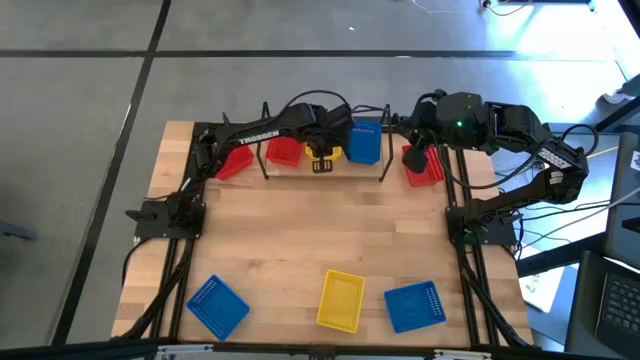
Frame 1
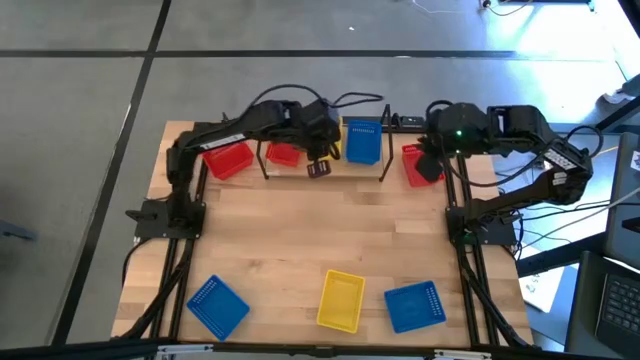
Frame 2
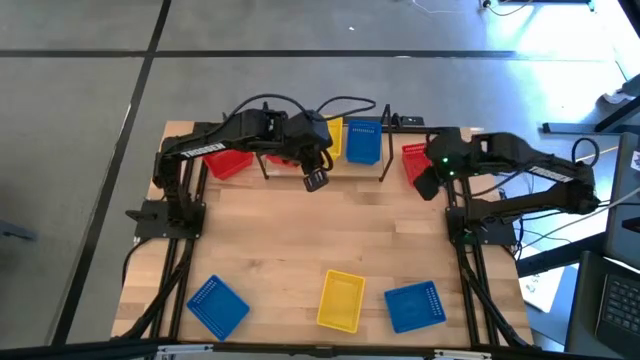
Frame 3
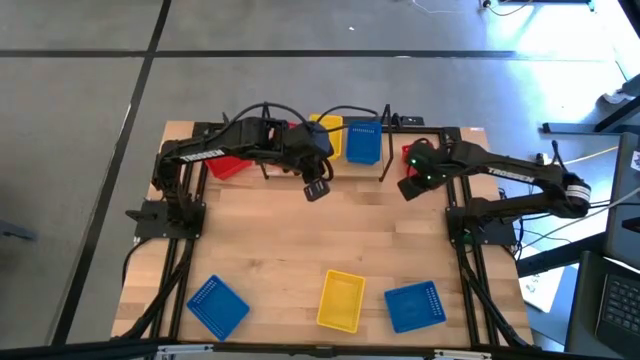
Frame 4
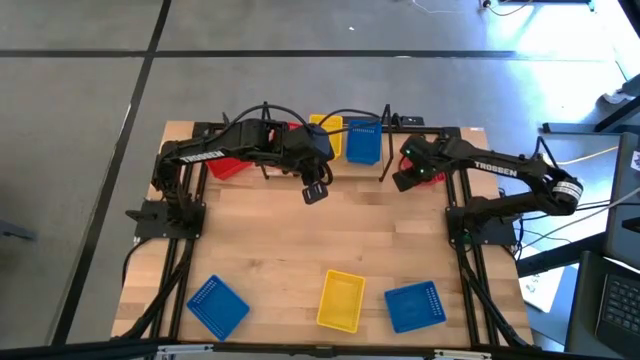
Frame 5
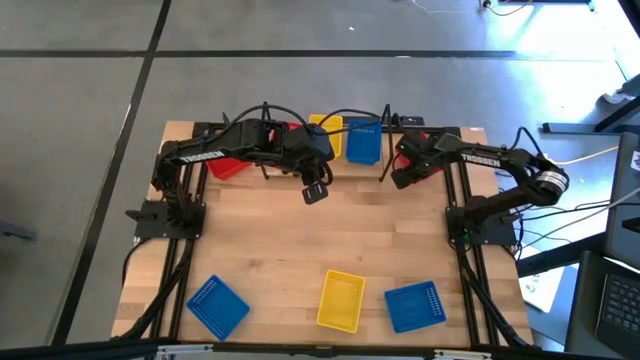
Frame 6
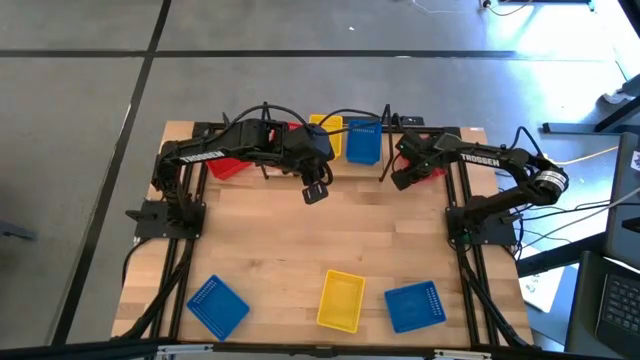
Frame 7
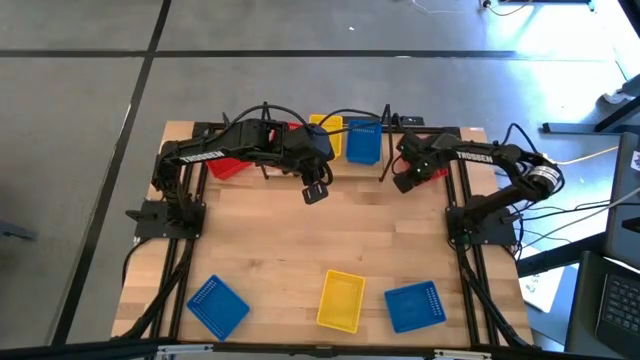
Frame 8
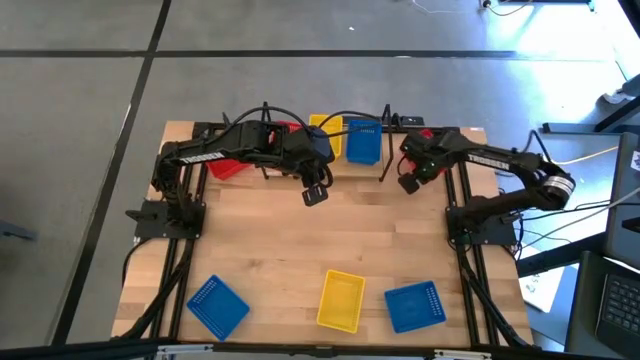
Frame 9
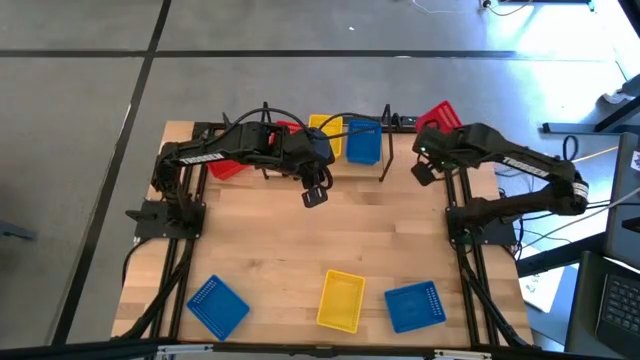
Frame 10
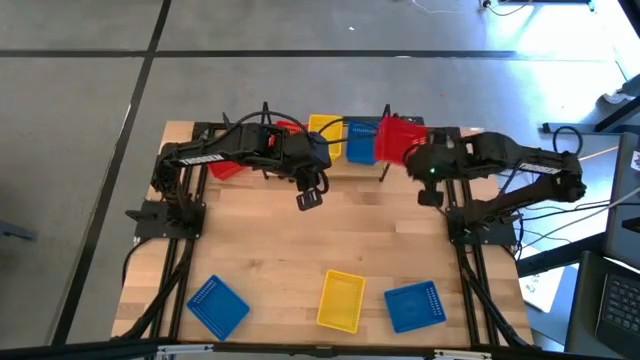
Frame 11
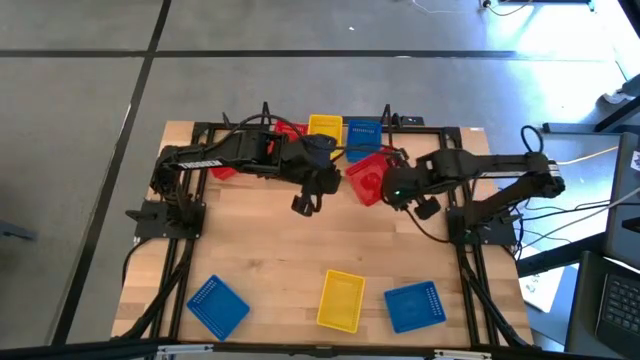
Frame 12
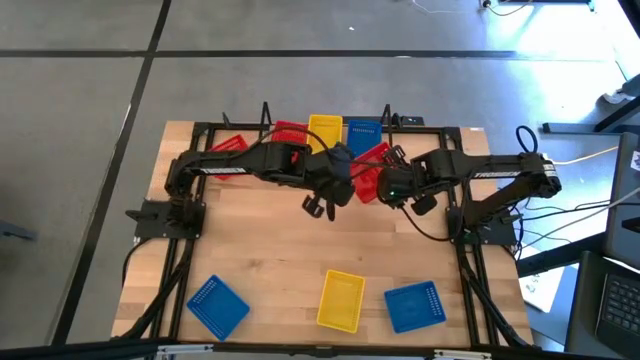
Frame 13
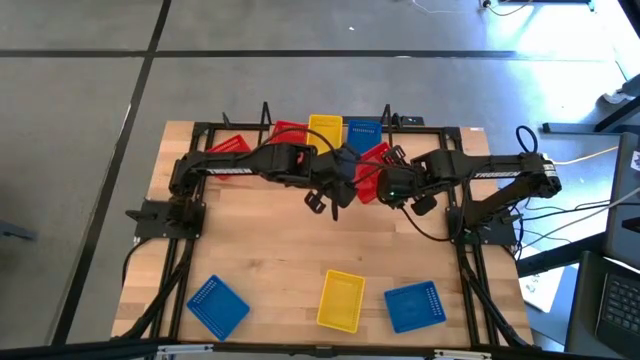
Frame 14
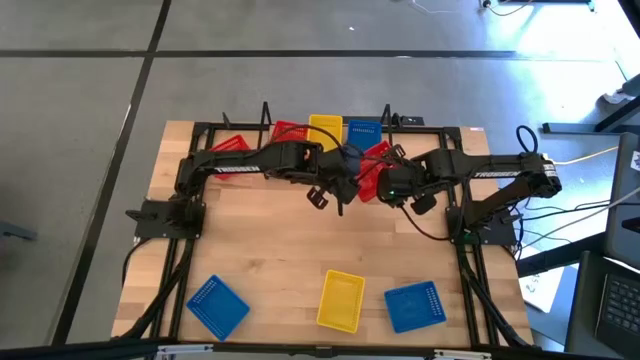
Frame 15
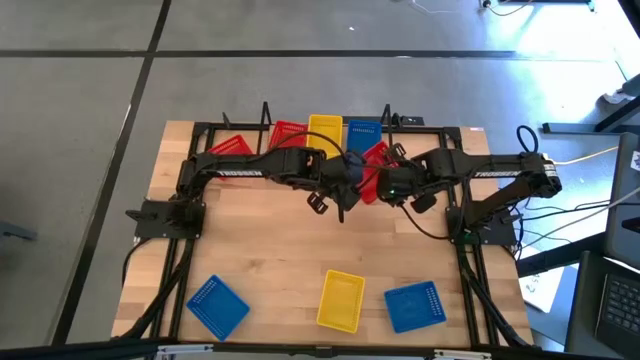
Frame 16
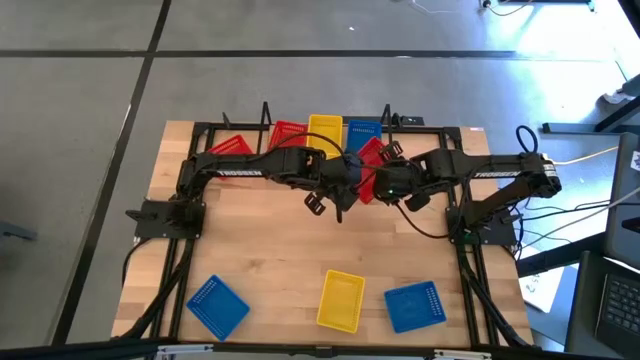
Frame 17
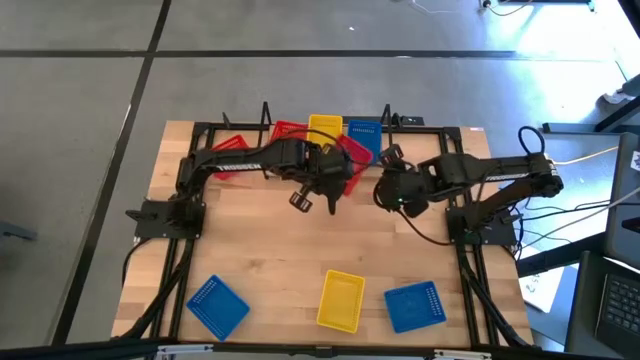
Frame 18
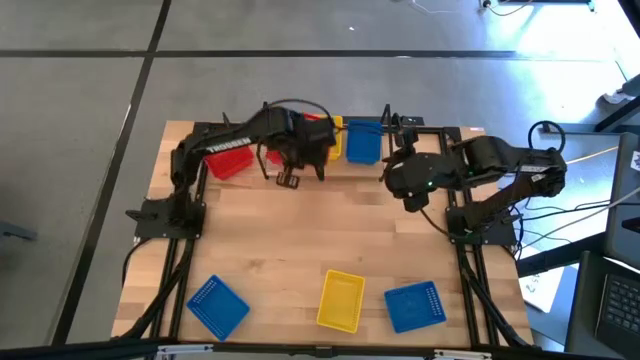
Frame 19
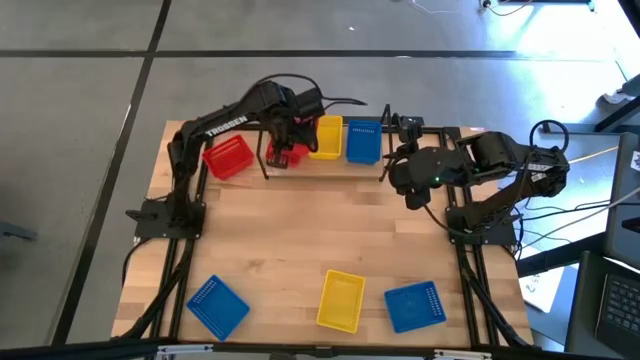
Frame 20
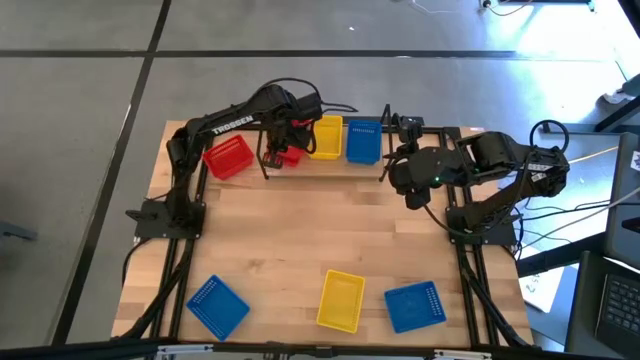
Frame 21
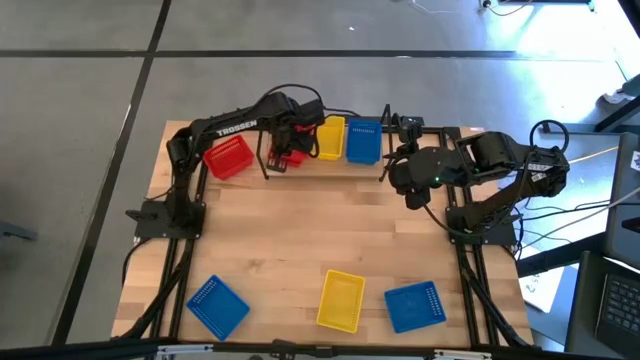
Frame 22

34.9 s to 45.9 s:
Task: Stack baskets on shelf by color
Stack the right red bin on the red bin on the shelf

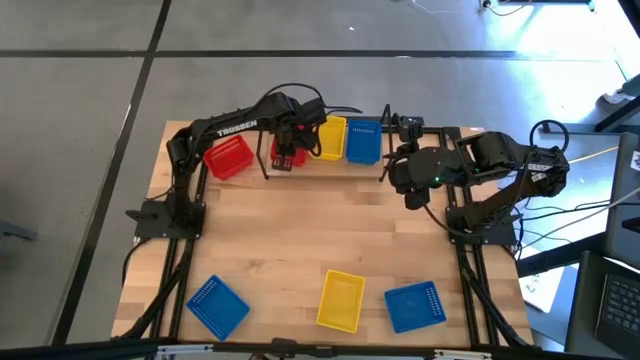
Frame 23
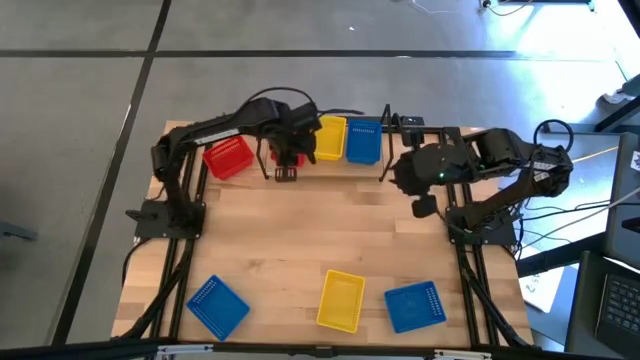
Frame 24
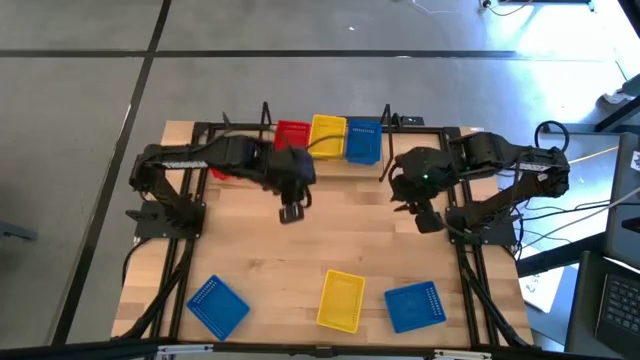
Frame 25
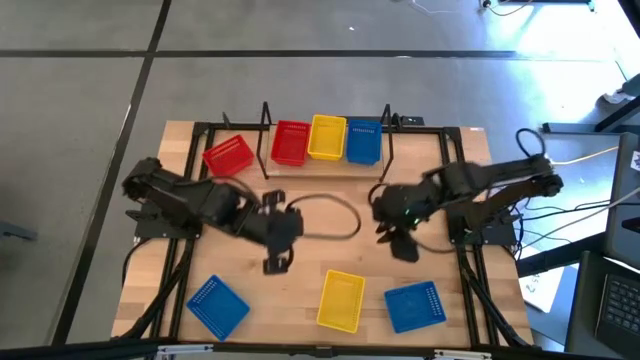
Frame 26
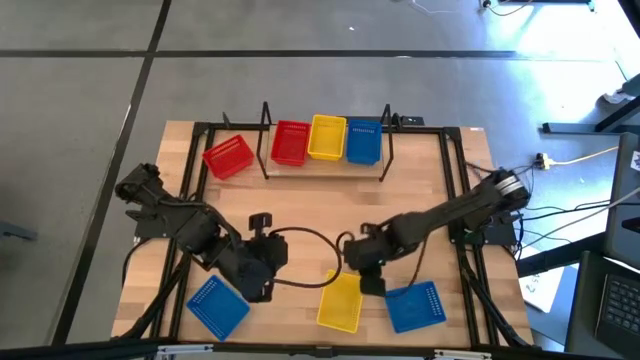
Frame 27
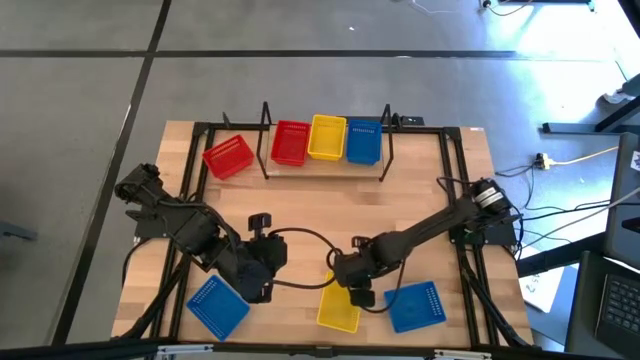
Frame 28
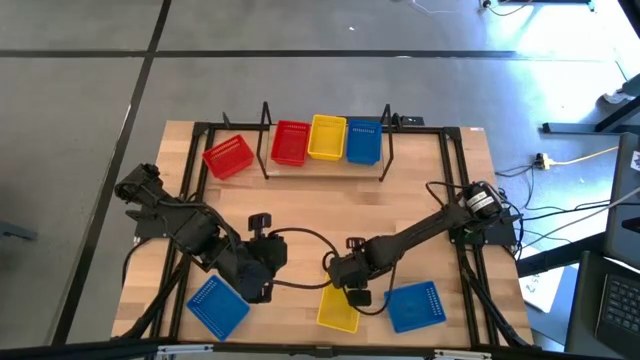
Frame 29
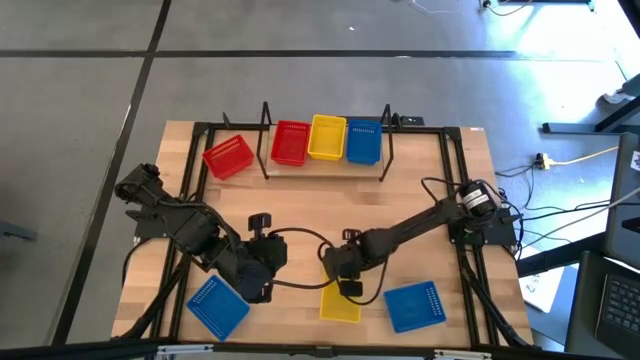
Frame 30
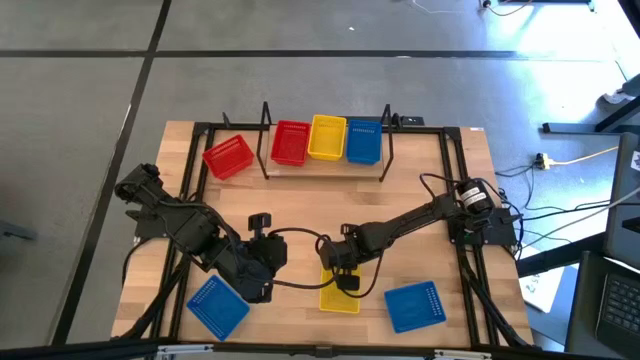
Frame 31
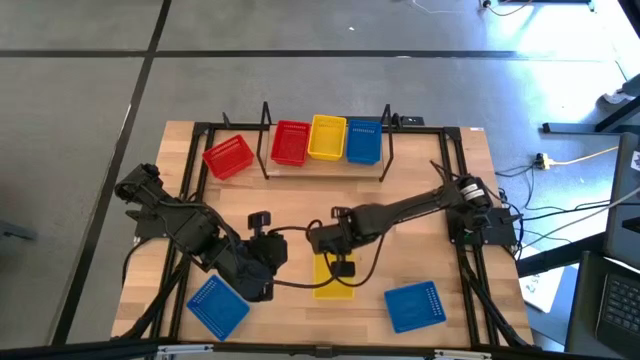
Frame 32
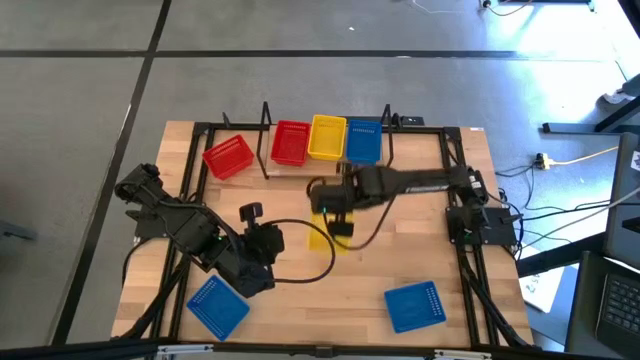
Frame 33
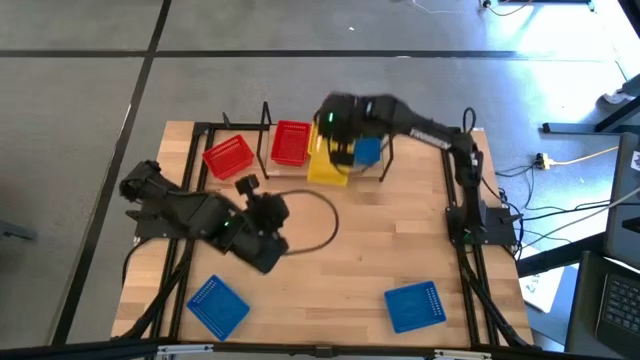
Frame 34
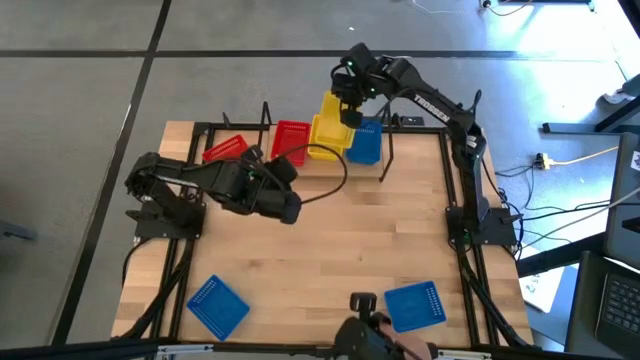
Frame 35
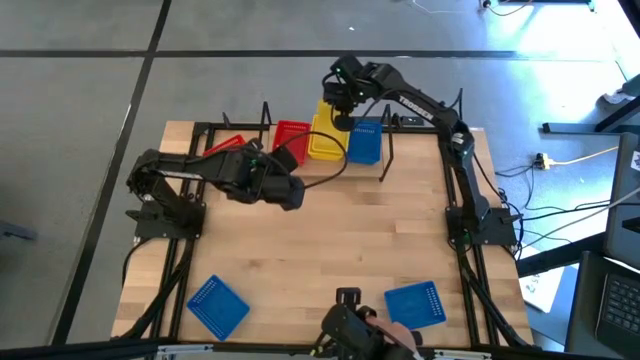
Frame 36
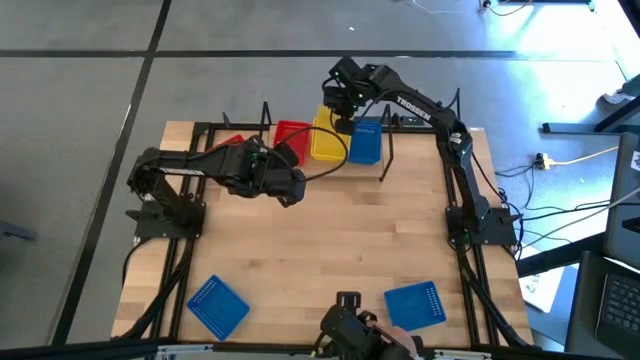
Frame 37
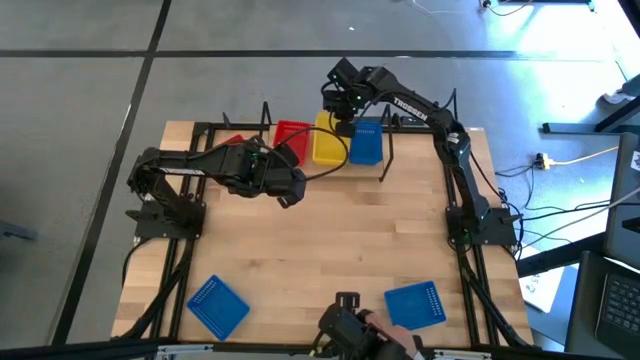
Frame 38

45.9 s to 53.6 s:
Stack the yellow bin on the yellow bin on the shelf

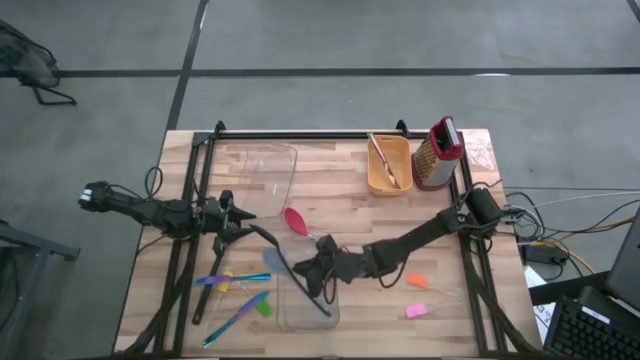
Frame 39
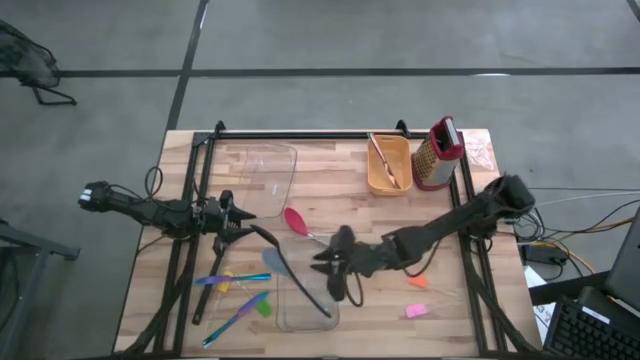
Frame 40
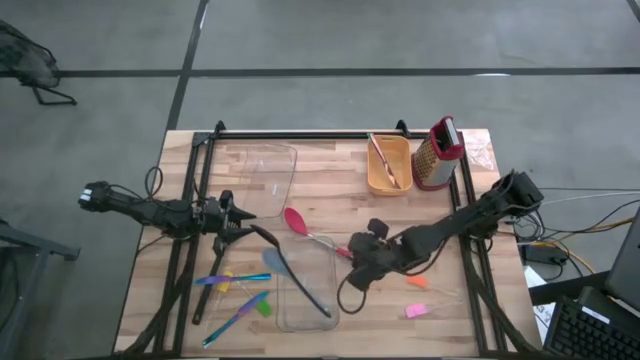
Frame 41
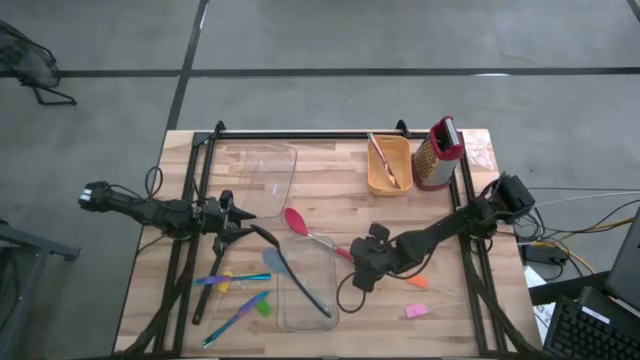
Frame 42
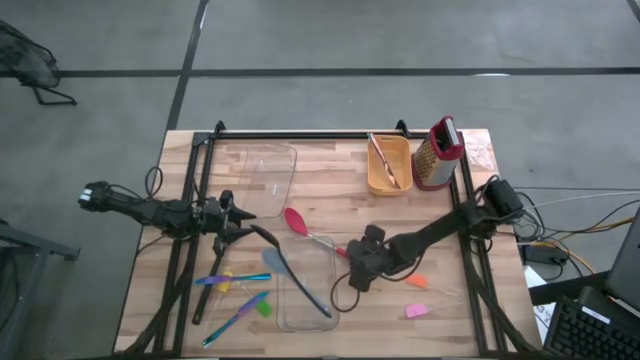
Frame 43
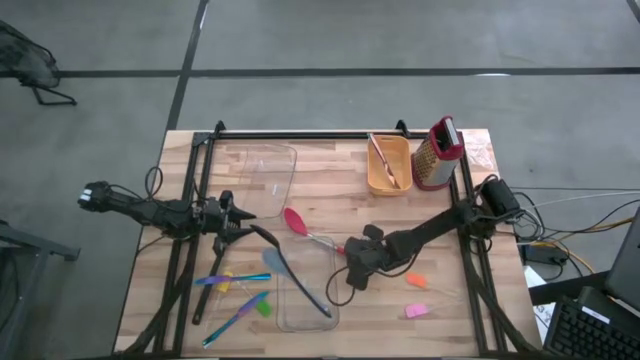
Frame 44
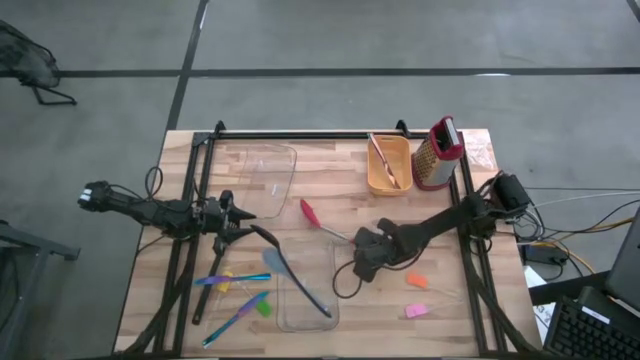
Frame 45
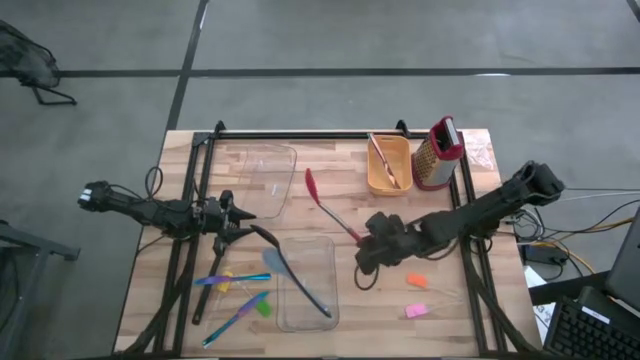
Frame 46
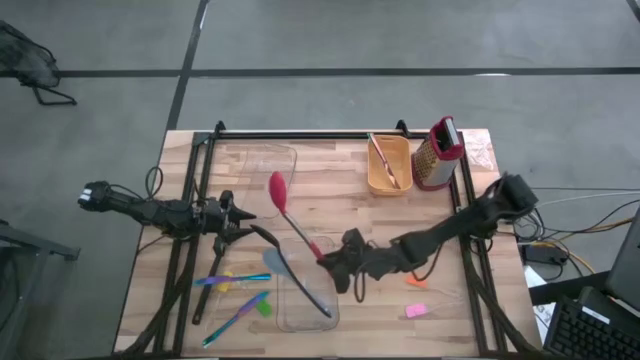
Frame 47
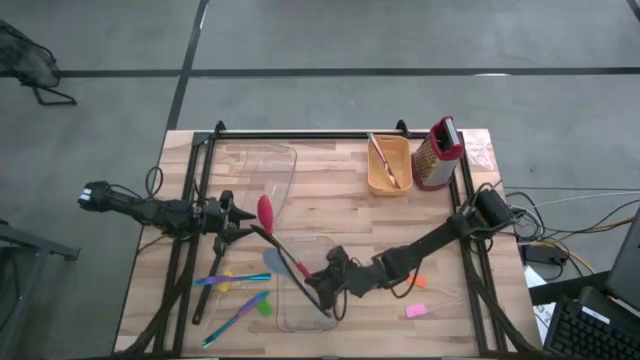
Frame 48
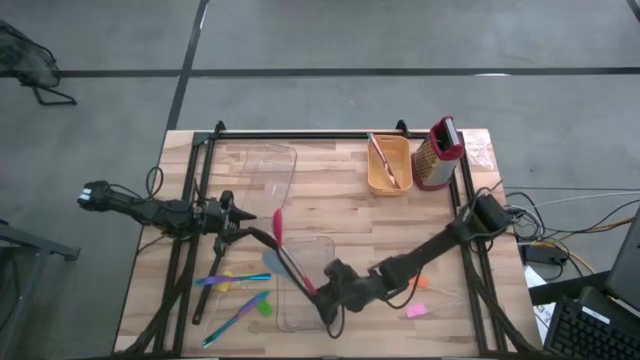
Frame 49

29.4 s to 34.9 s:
Task: Pick & Place Kitchen Items
Put the red serving spoon into the bottom transparent bin
